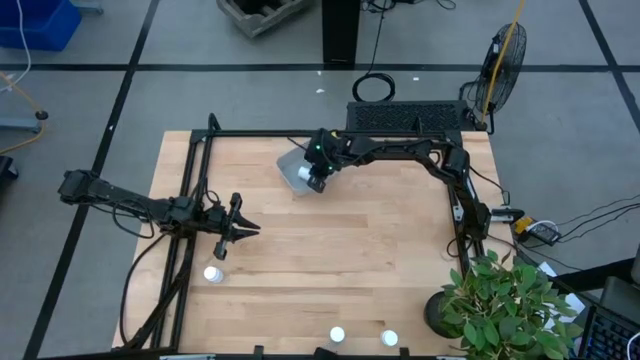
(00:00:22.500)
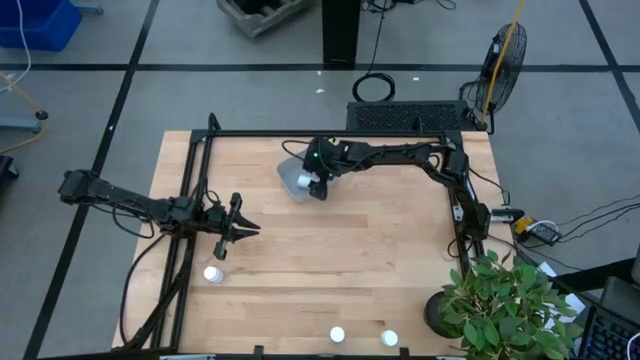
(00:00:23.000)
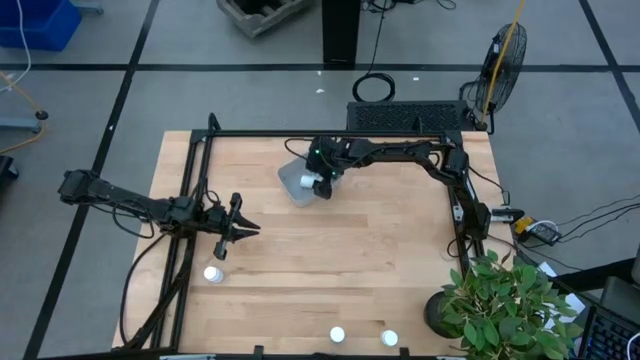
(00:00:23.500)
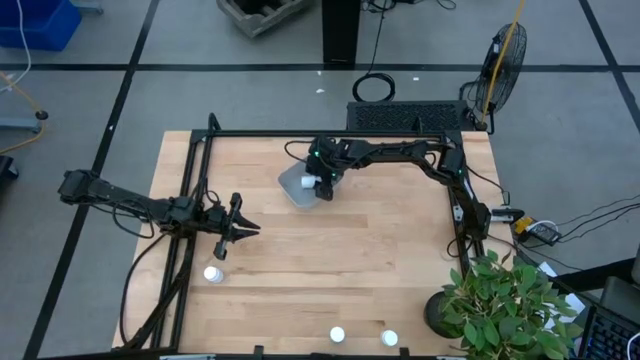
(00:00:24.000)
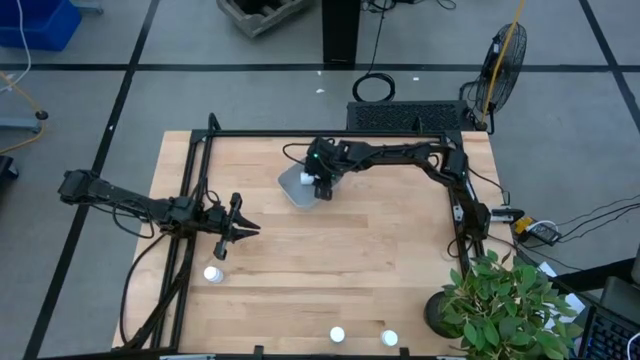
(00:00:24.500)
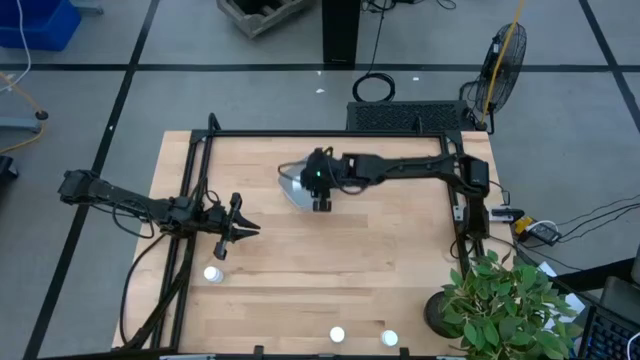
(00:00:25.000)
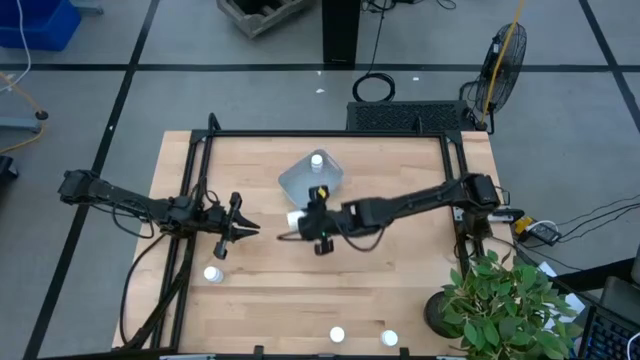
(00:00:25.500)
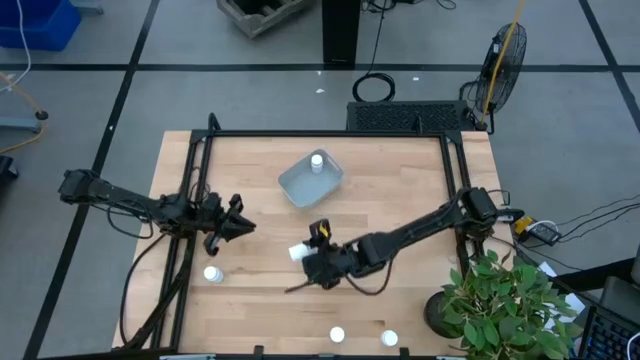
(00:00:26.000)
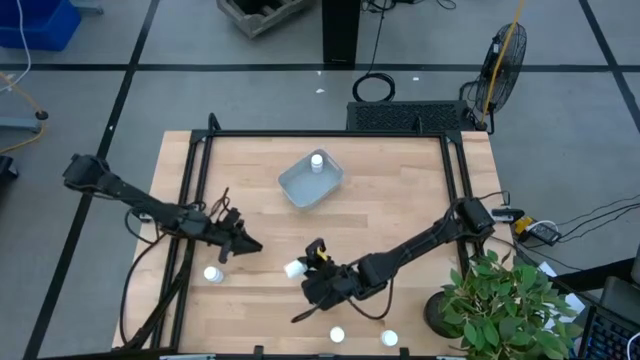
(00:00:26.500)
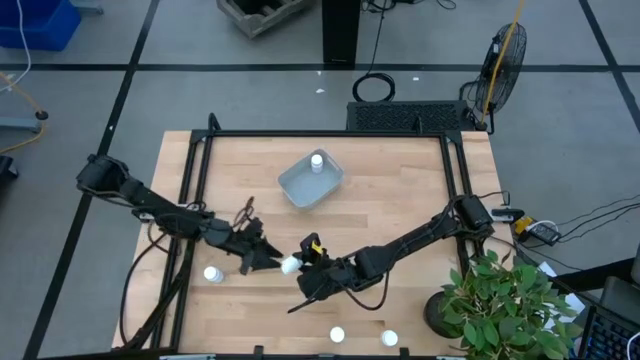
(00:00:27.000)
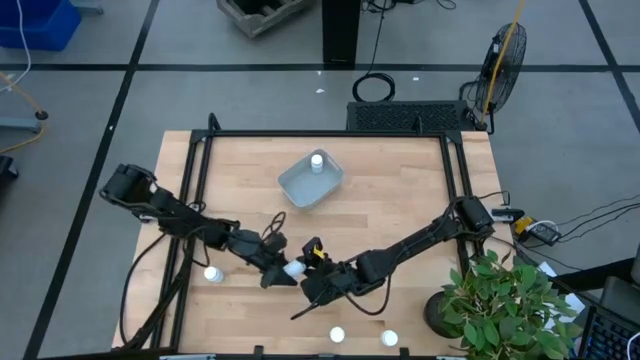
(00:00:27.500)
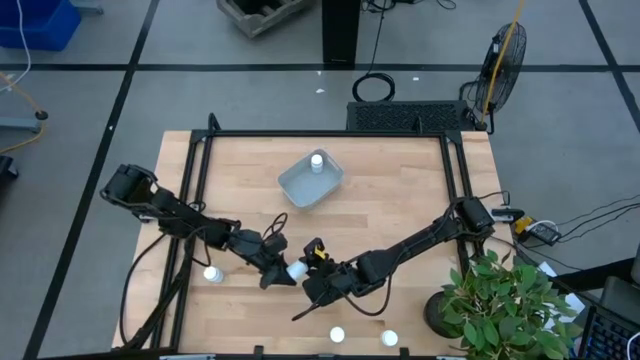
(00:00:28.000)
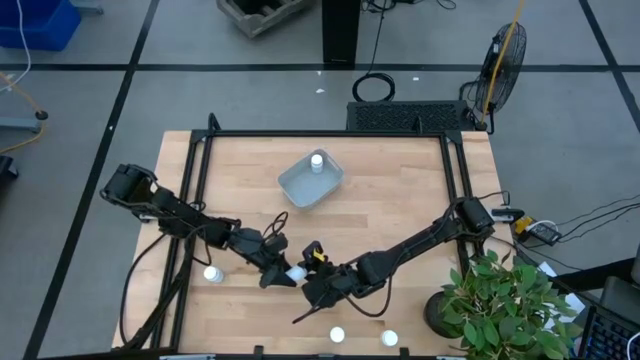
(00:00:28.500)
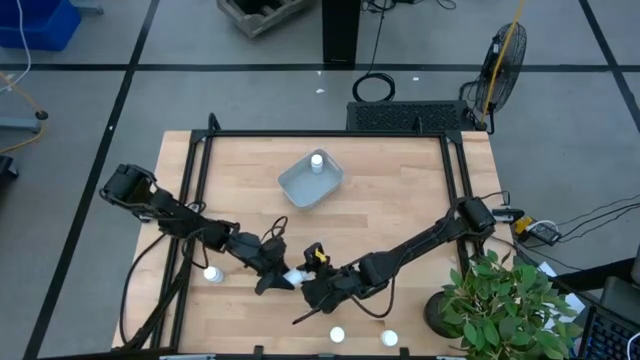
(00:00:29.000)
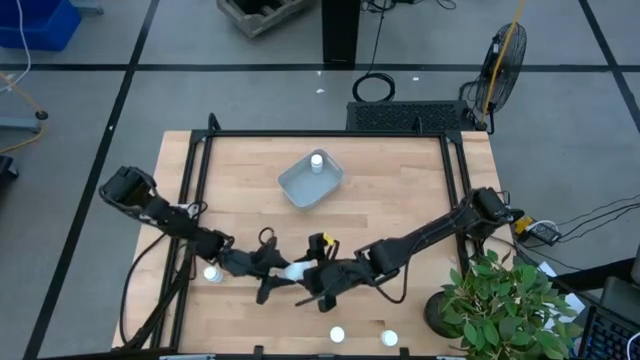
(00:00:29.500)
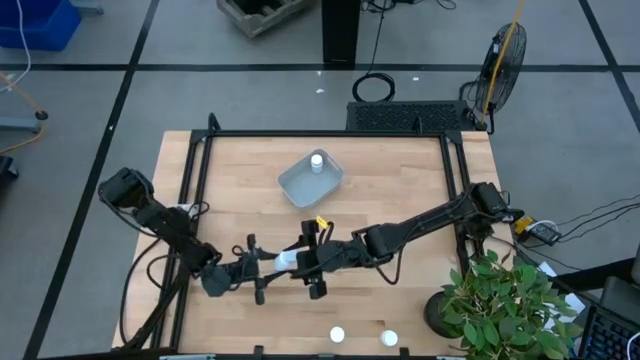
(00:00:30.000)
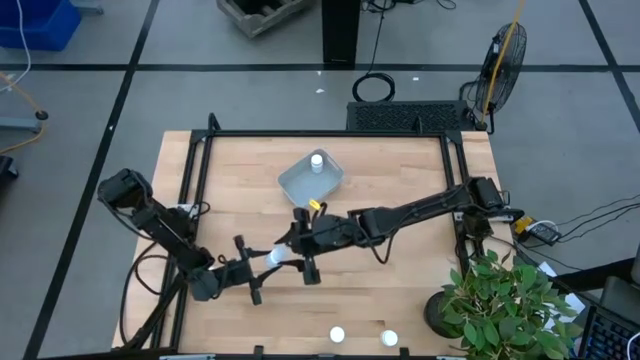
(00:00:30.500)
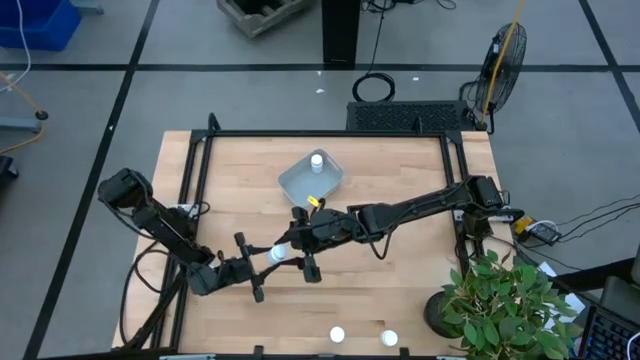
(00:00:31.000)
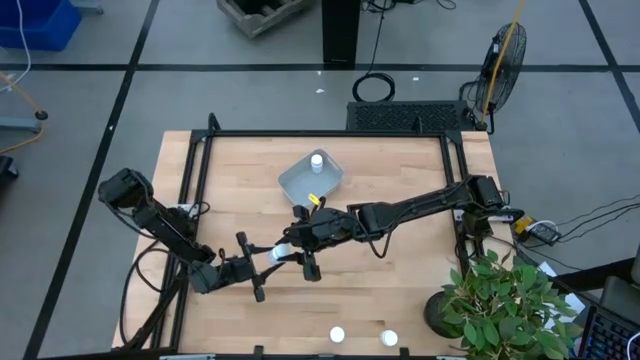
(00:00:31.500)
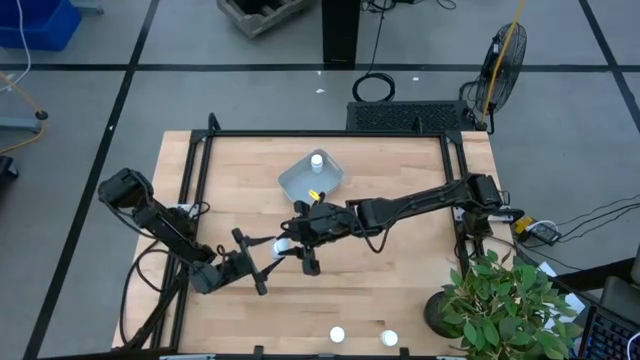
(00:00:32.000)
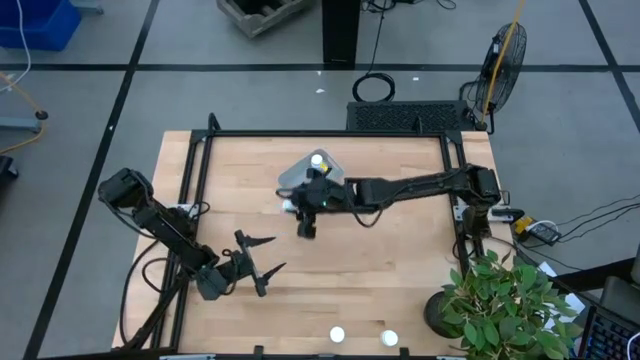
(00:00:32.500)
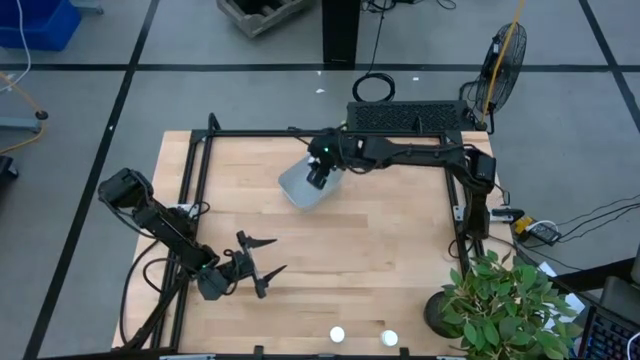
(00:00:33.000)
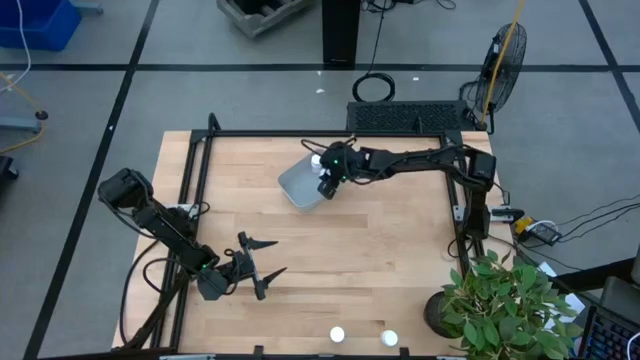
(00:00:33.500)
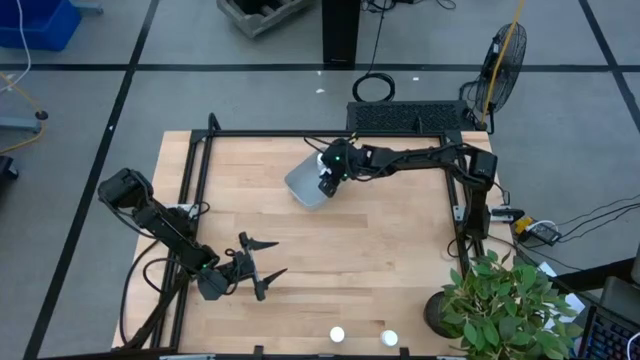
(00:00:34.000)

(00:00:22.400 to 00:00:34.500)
Task: Pick and place pill bottles into a basket
Put the white medicine bottle into the gray bin

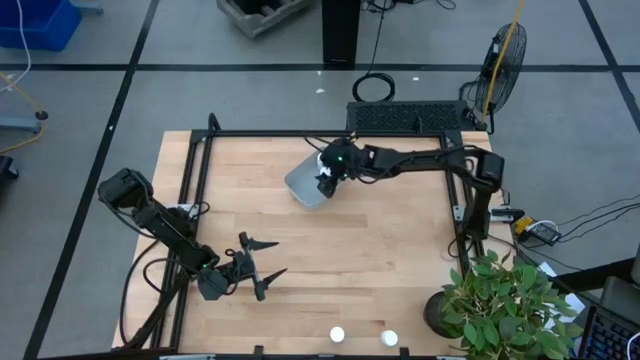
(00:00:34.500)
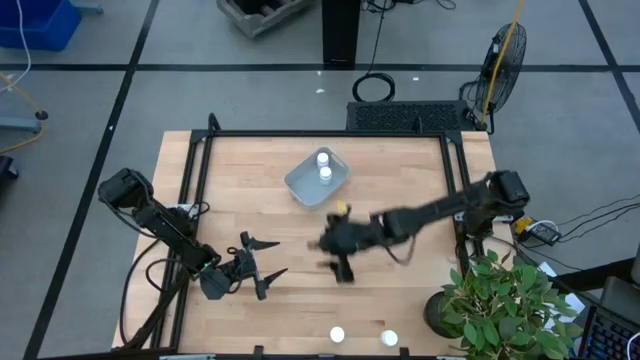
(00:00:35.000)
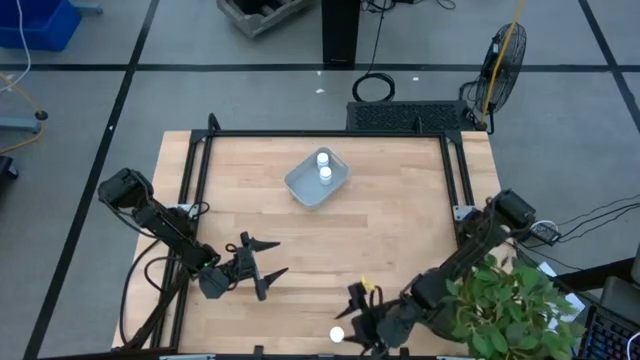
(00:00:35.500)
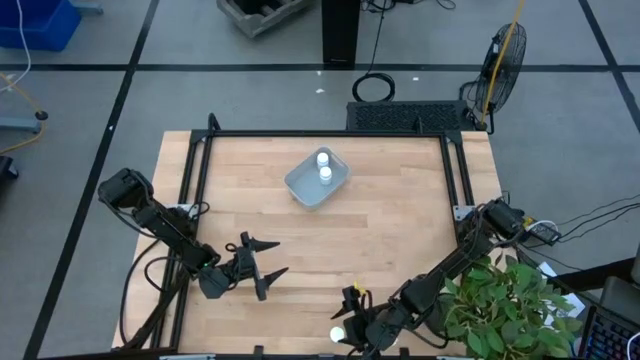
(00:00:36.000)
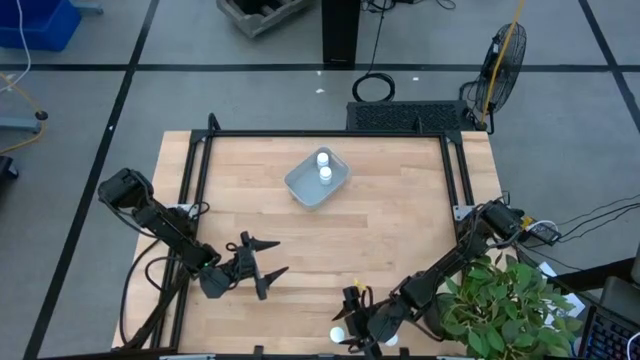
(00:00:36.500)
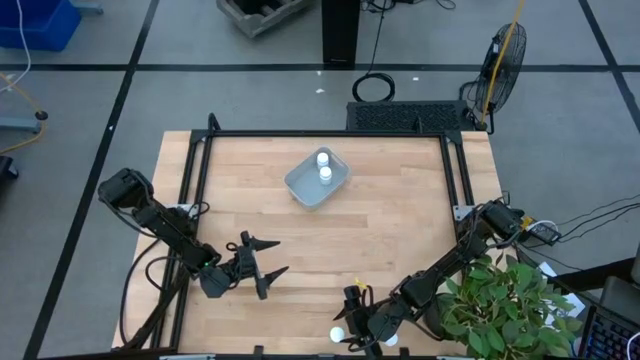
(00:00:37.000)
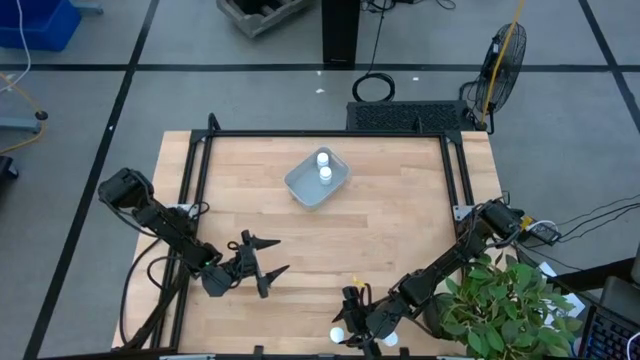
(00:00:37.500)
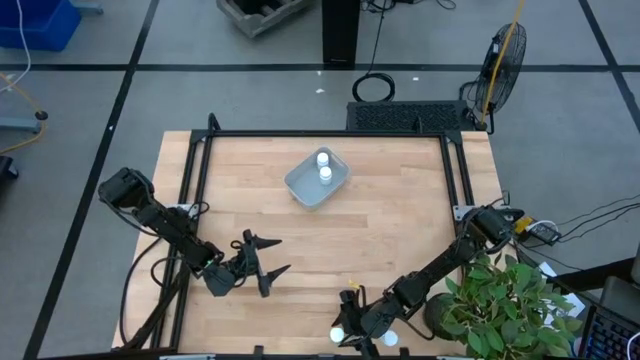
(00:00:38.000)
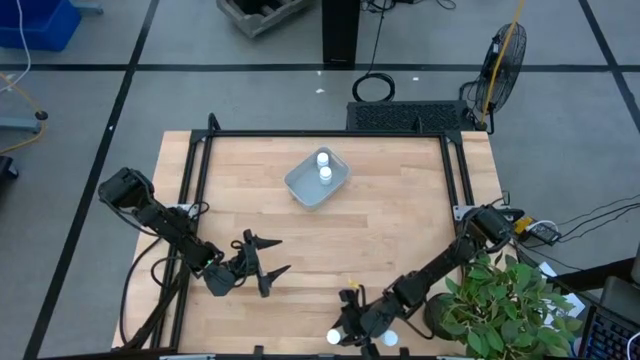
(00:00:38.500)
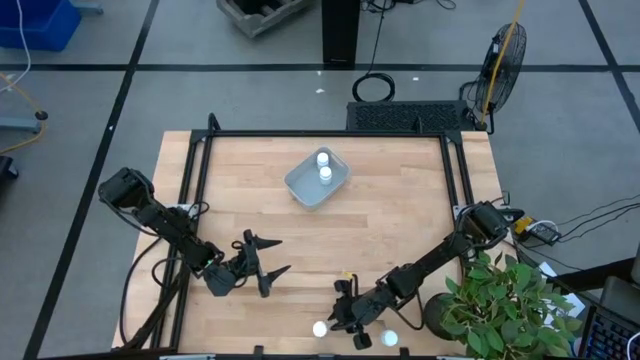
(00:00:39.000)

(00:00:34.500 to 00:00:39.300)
Put the bottom right white medicine bottle into the gray bin

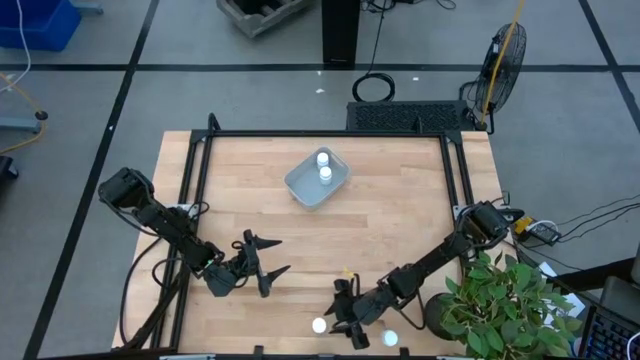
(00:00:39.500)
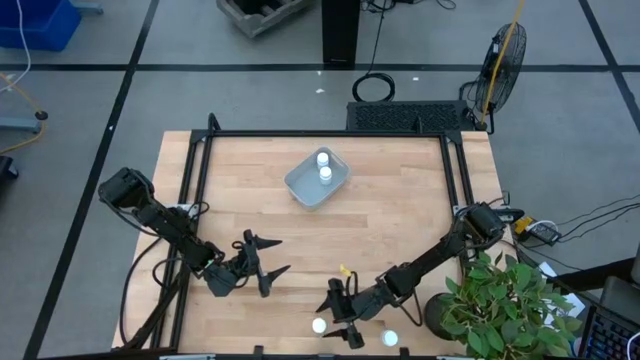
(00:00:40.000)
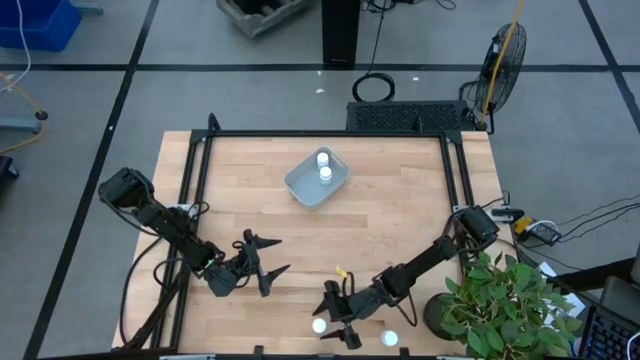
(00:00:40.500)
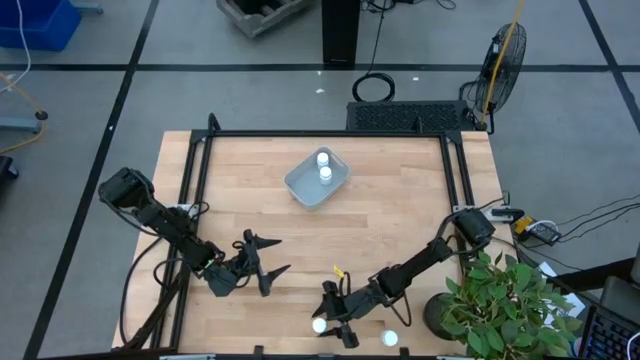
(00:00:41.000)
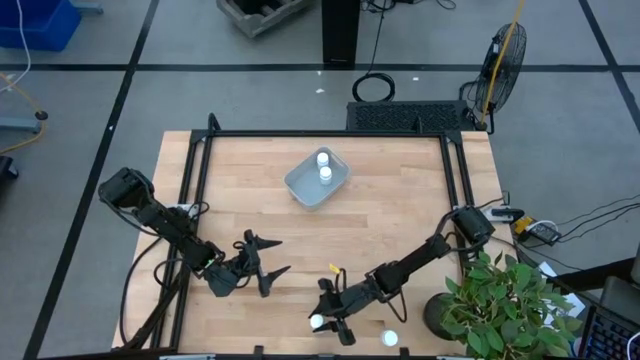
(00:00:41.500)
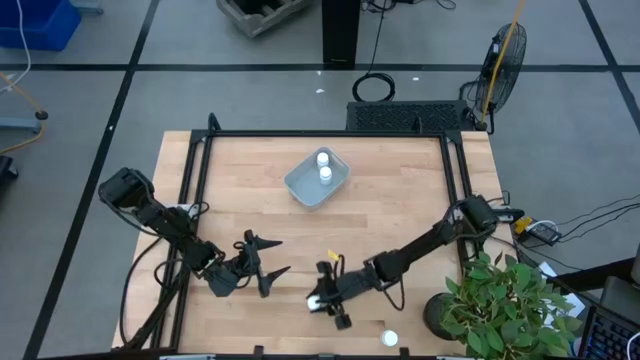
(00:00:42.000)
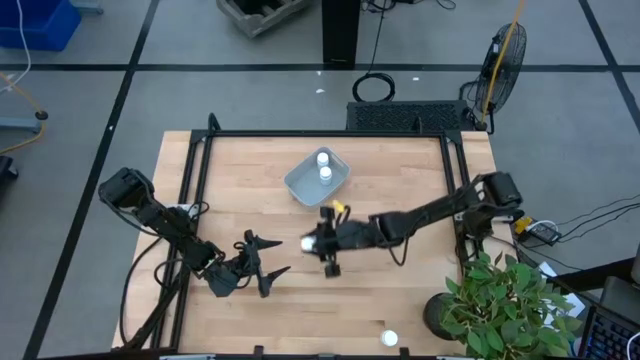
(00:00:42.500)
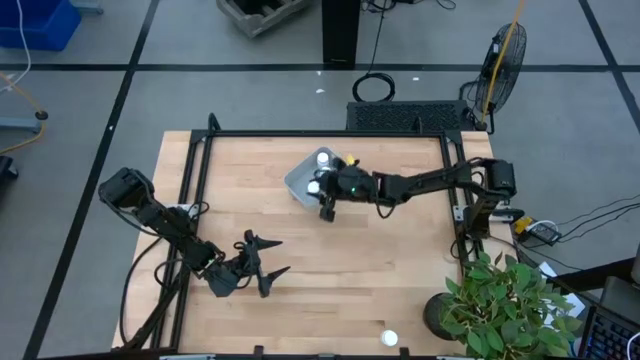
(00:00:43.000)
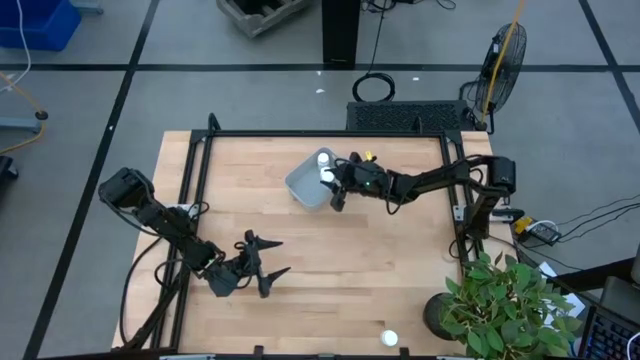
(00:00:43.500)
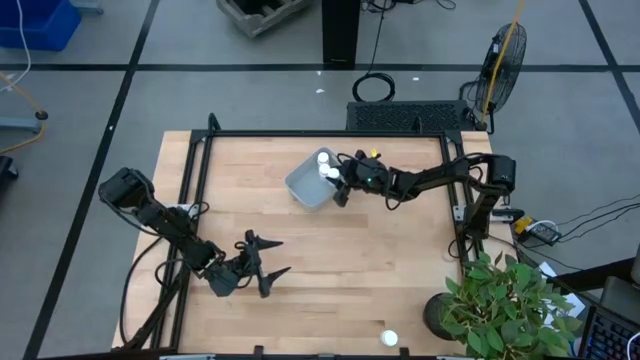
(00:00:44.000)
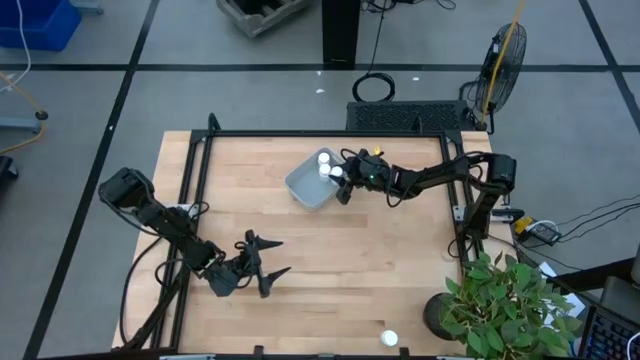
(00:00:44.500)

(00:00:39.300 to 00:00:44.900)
Put the bottom right white medicine bottle into the gray bin
